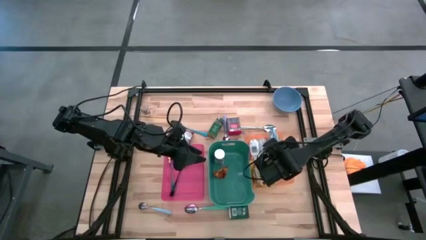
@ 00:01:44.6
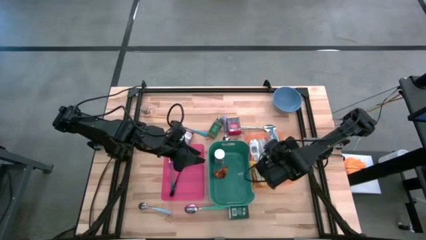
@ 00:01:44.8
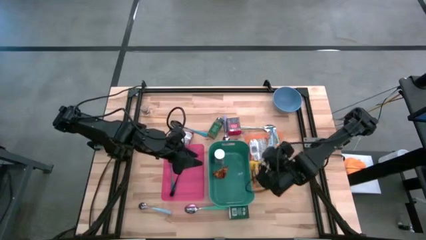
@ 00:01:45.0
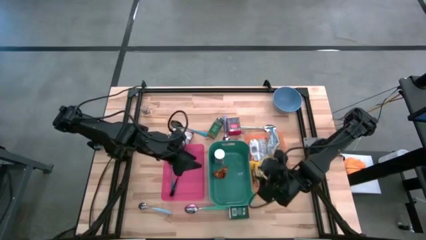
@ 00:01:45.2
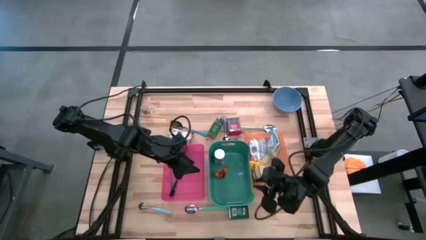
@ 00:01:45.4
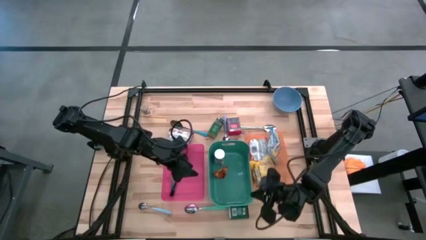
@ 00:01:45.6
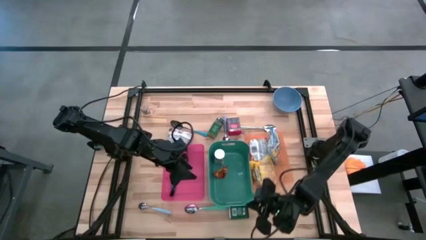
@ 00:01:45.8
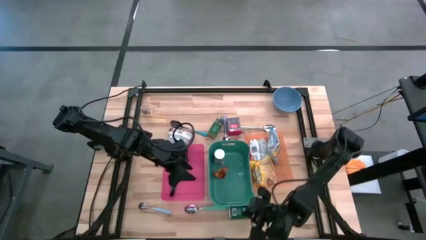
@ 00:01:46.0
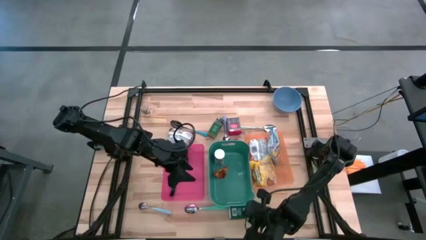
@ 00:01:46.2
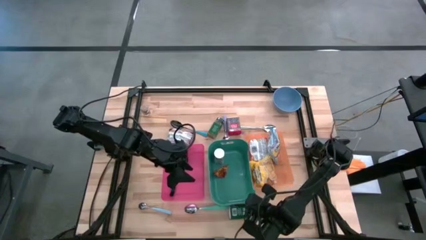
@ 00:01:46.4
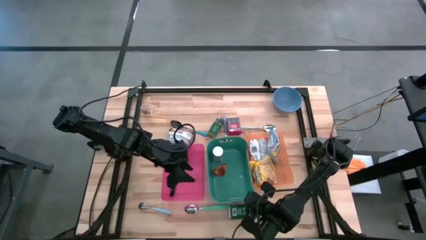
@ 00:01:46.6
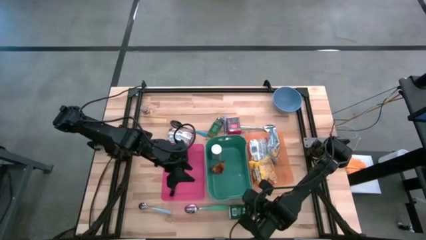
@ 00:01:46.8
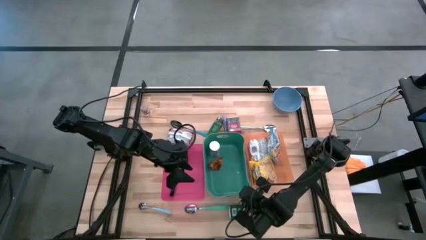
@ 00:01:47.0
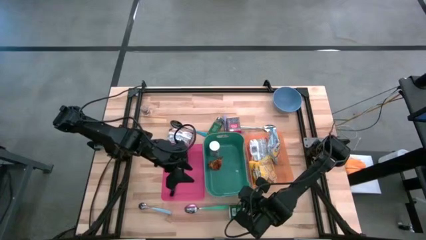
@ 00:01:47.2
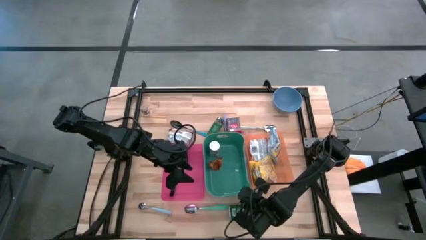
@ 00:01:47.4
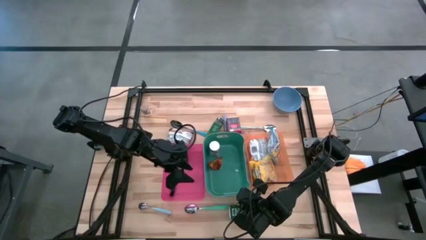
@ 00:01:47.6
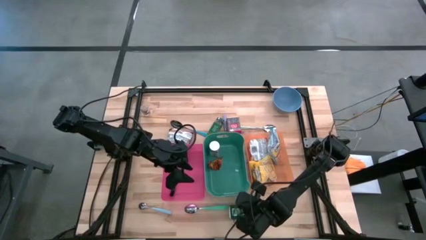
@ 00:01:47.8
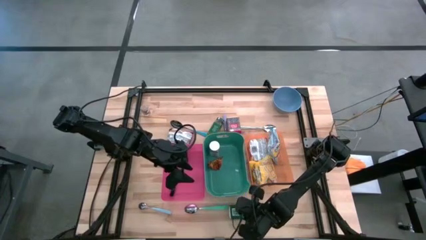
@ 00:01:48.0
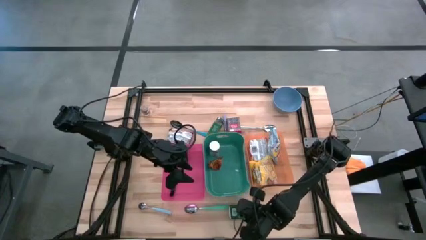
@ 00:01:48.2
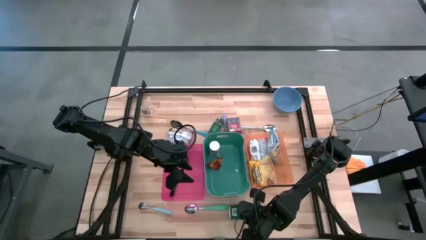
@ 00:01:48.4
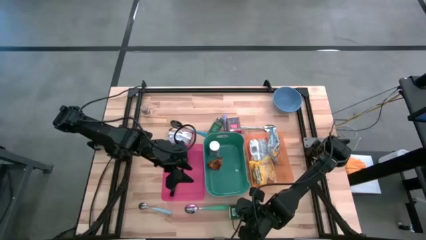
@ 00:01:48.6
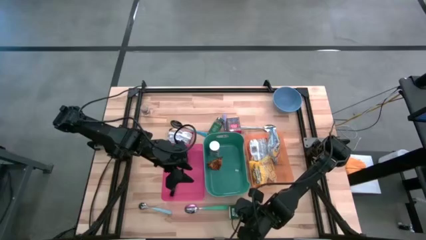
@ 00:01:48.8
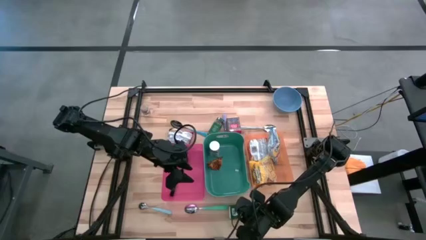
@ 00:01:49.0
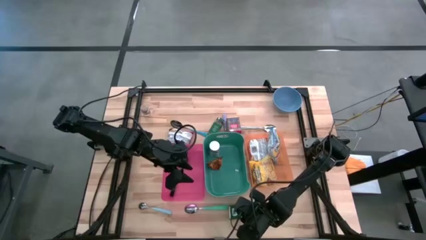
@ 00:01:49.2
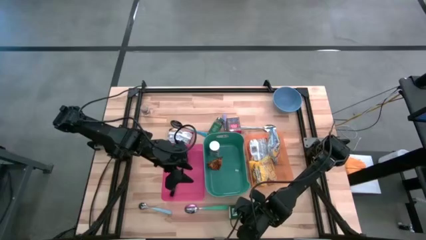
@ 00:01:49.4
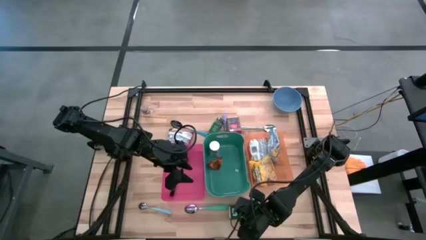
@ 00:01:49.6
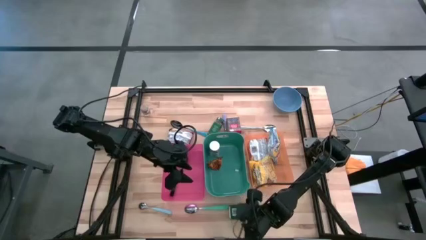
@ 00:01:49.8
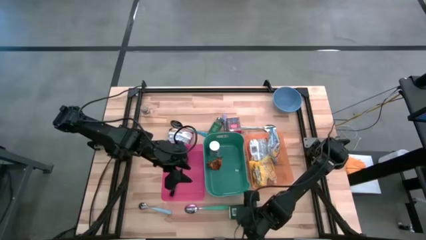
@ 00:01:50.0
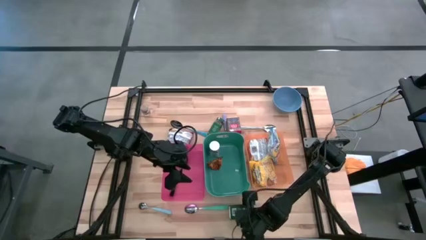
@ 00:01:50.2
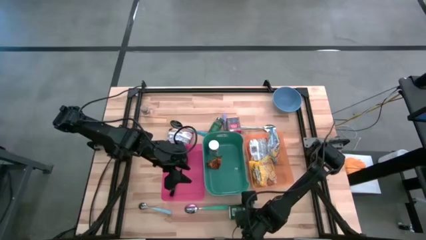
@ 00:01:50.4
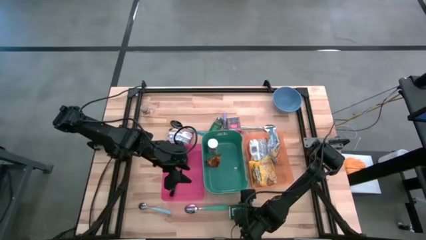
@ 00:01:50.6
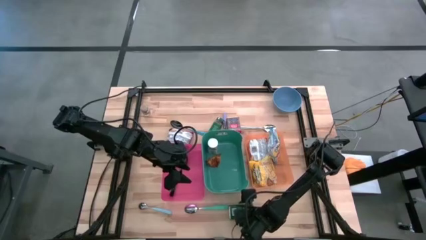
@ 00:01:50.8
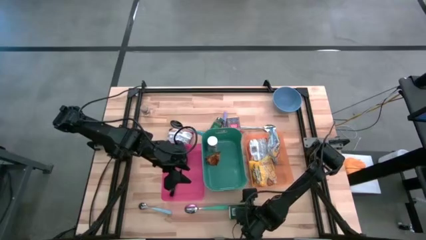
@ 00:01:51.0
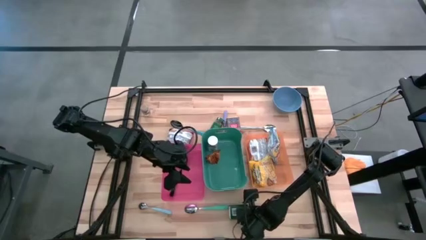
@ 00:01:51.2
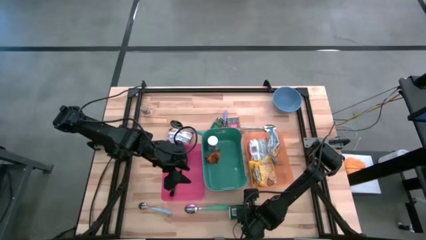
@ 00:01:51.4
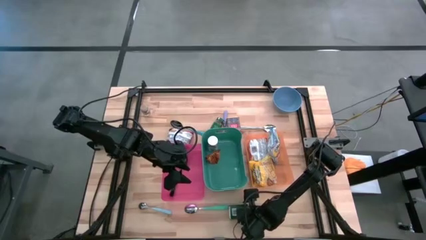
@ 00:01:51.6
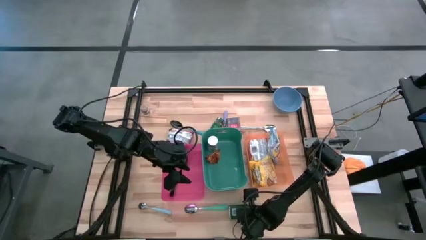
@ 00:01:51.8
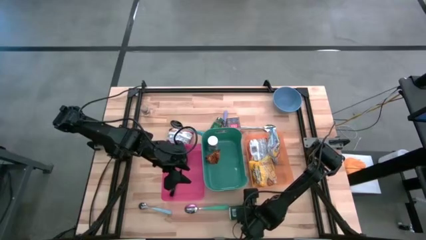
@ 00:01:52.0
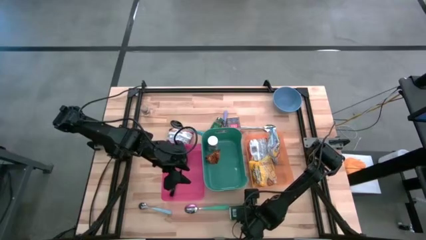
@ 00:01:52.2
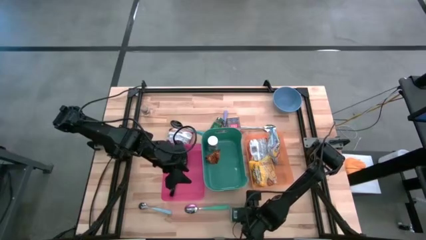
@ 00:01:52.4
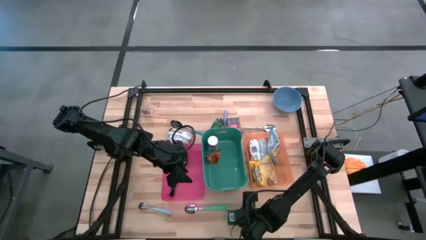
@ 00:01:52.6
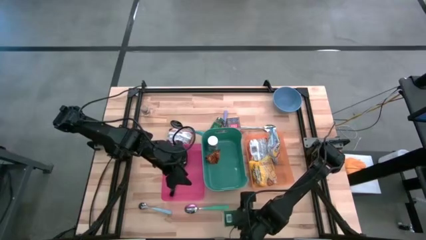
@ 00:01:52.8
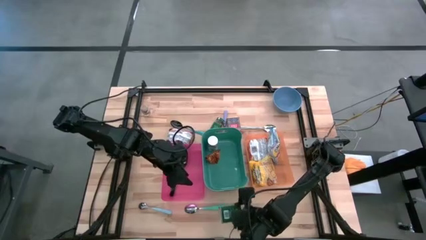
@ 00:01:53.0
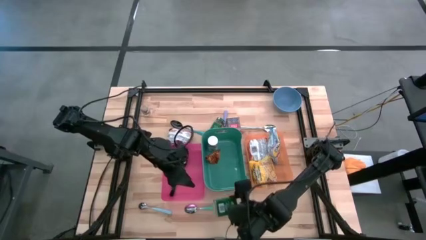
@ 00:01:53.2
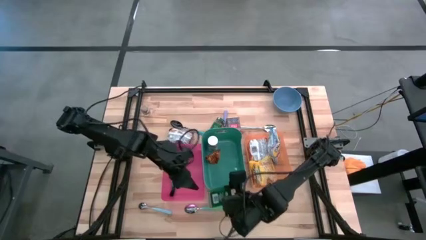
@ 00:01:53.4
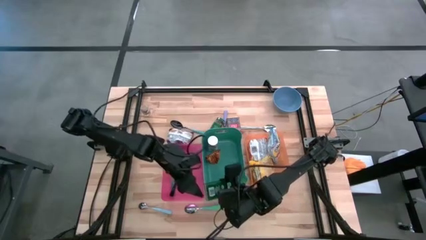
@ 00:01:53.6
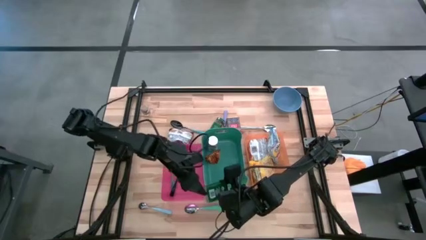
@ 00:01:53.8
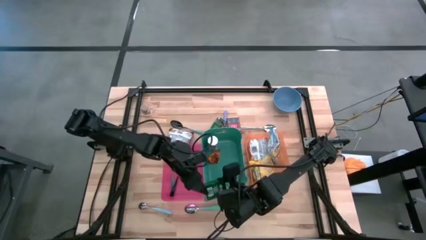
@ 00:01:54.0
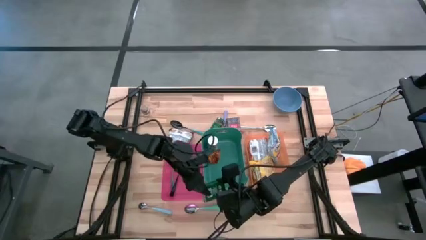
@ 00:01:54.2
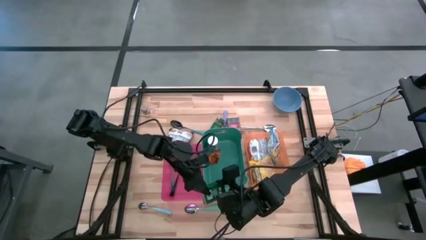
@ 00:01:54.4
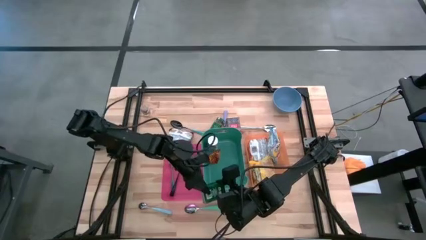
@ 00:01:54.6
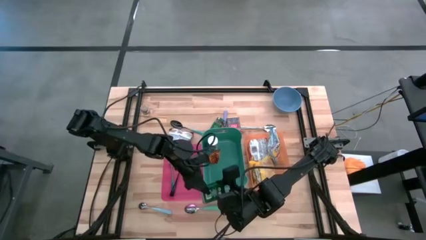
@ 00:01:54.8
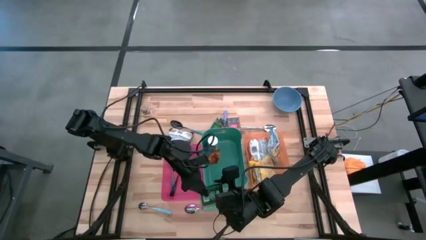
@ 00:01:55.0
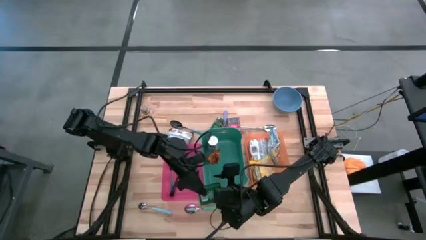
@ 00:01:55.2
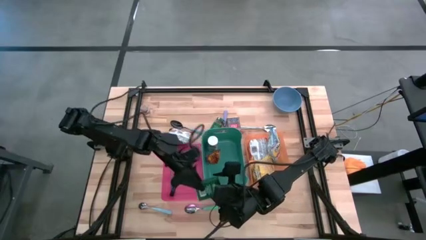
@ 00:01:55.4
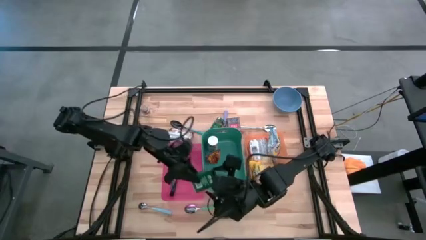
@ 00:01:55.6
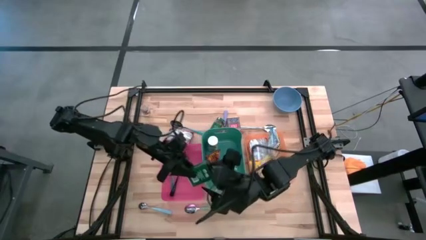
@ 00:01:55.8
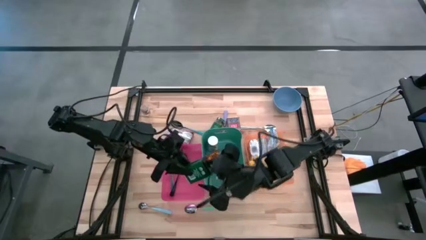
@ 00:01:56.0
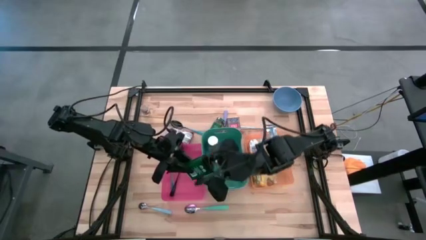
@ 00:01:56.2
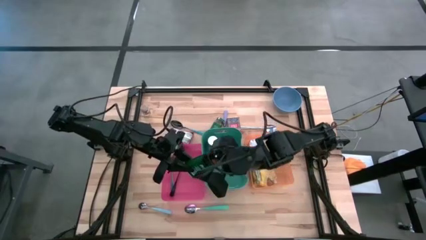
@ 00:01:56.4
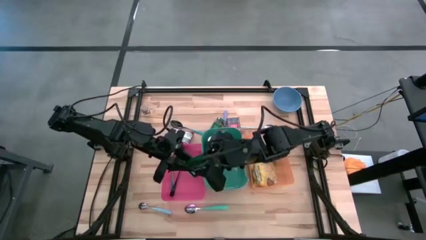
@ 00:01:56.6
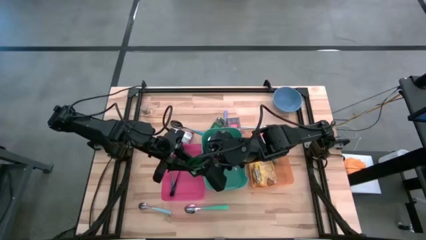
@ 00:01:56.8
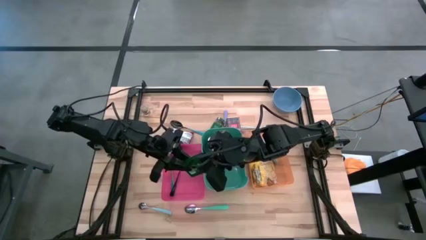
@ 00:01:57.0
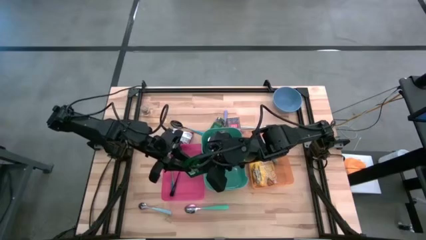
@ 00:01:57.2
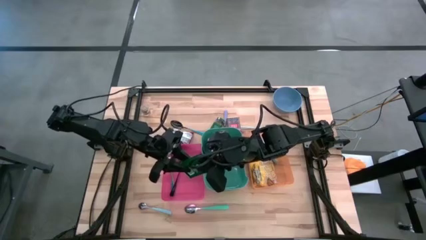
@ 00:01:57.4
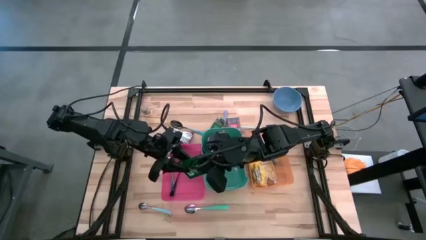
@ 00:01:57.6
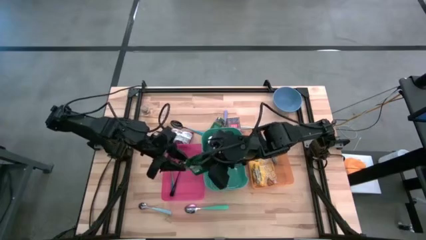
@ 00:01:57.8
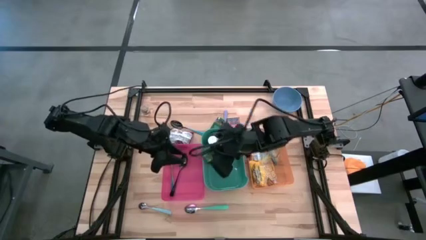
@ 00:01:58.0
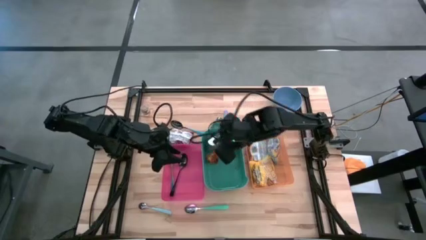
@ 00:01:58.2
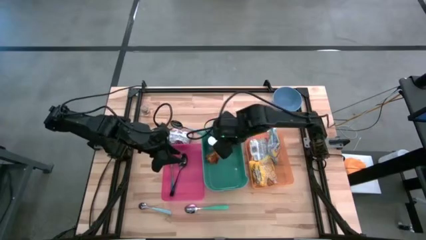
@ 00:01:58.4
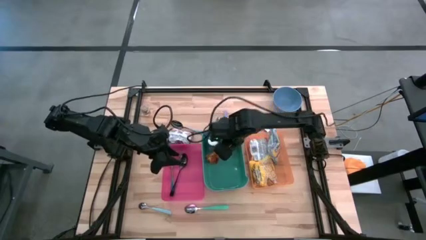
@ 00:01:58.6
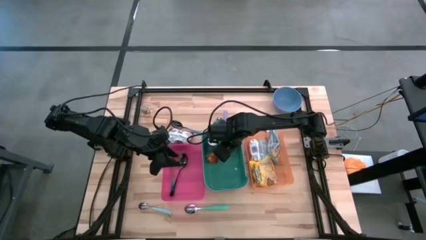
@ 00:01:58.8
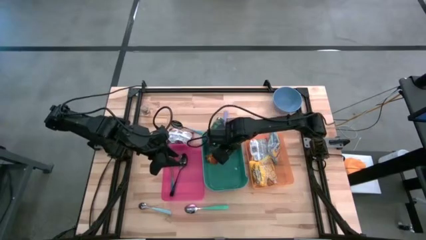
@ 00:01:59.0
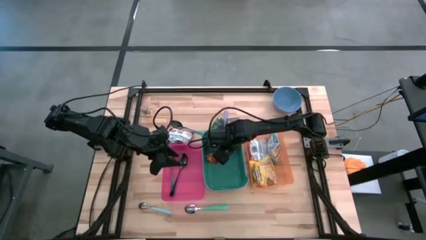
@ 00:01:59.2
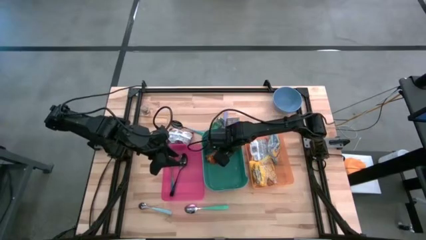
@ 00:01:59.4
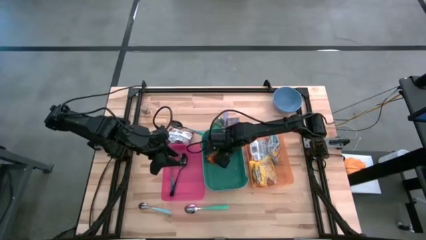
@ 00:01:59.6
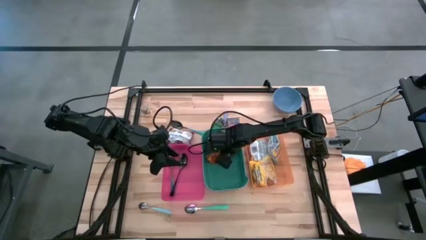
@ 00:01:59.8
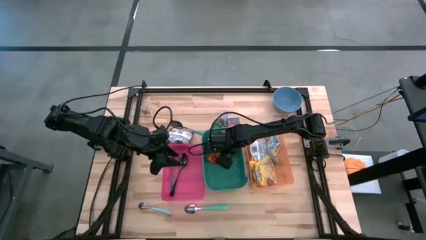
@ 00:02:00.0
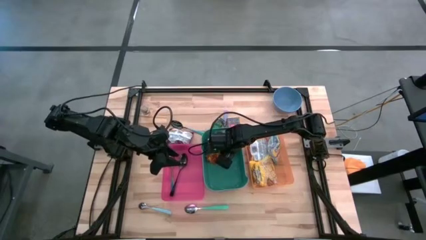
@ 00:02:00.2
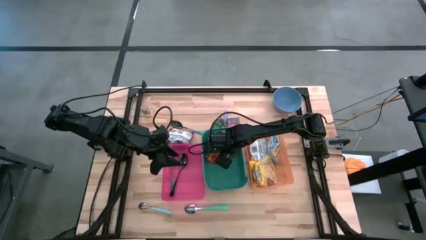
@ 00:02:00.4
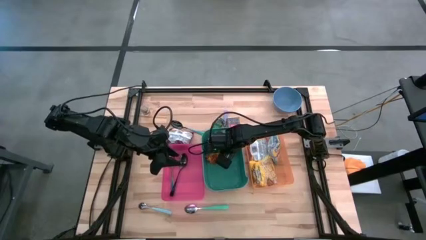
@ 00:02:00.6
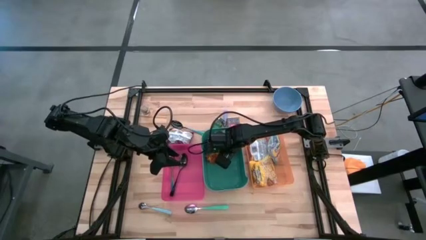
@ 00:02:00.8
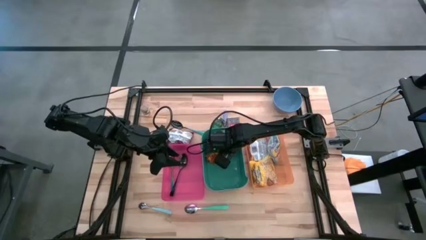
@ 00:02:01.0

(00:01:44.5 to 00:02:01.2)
Put the black seasoning can into the green bin
